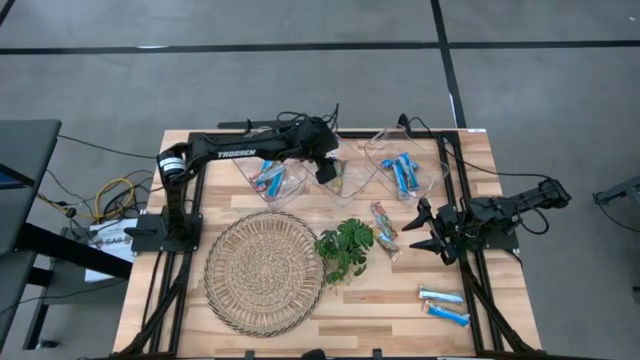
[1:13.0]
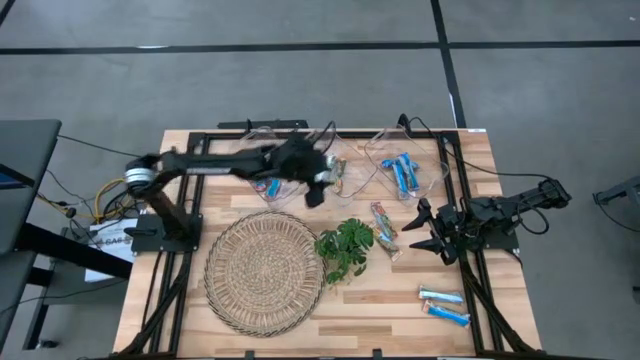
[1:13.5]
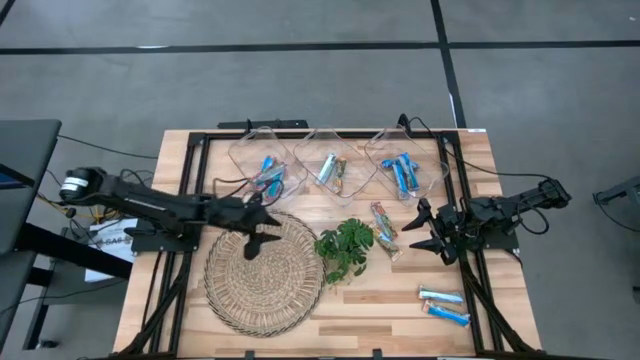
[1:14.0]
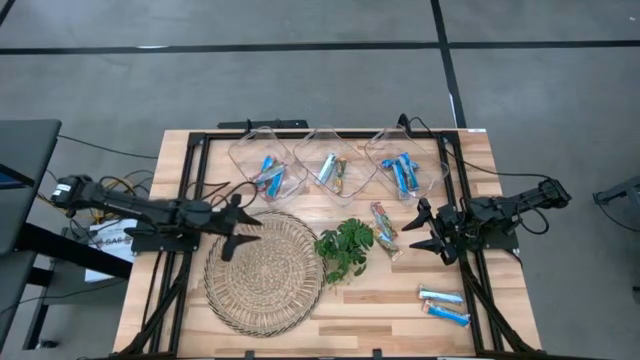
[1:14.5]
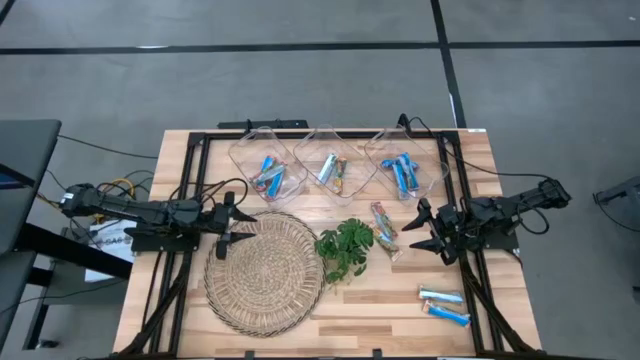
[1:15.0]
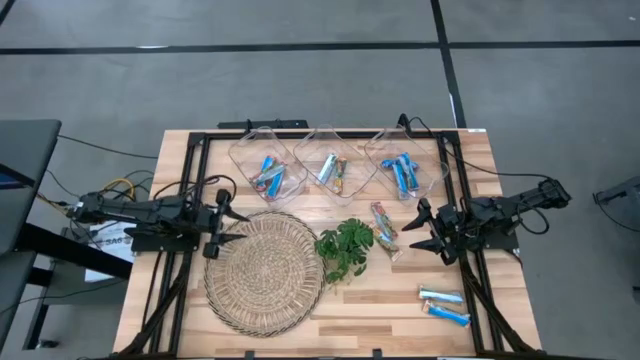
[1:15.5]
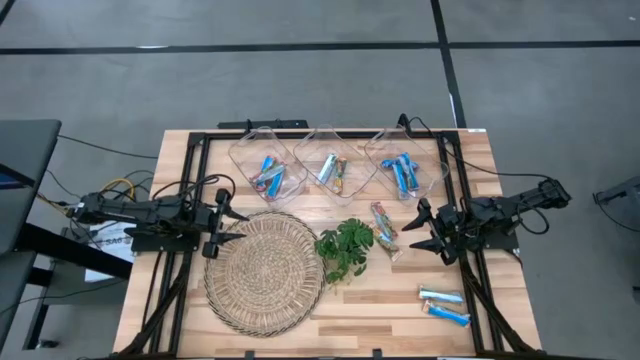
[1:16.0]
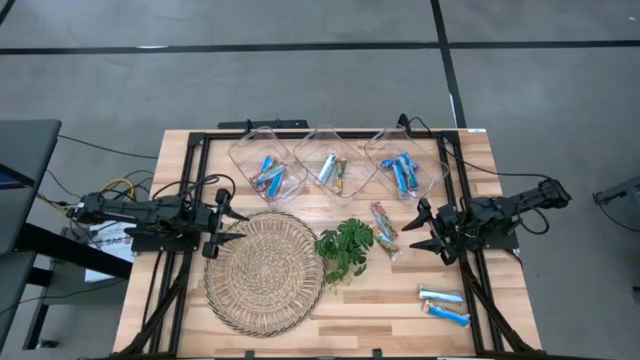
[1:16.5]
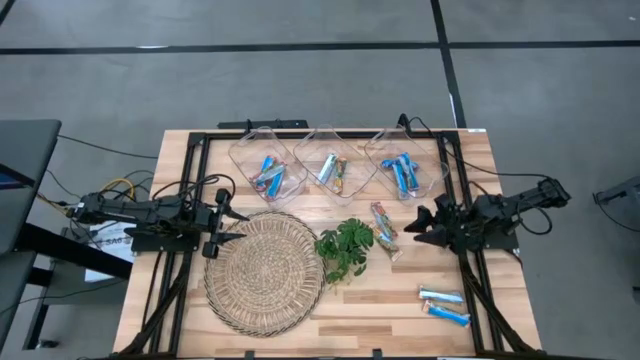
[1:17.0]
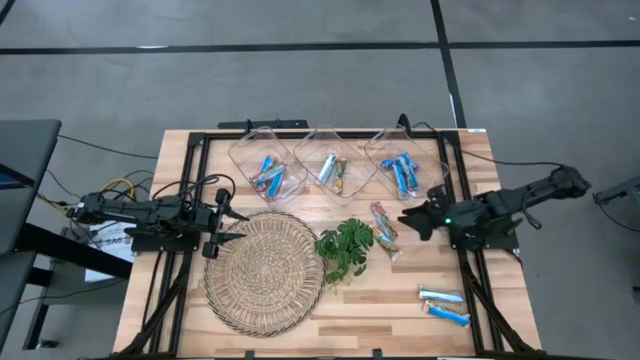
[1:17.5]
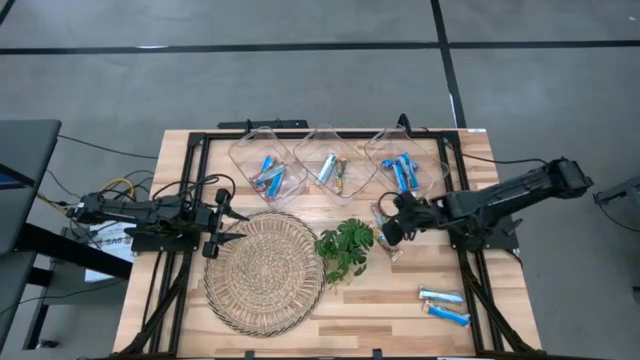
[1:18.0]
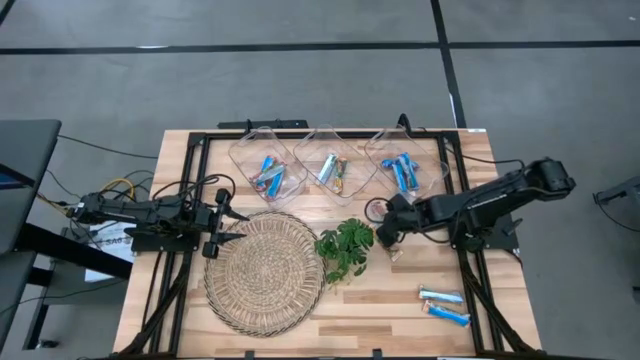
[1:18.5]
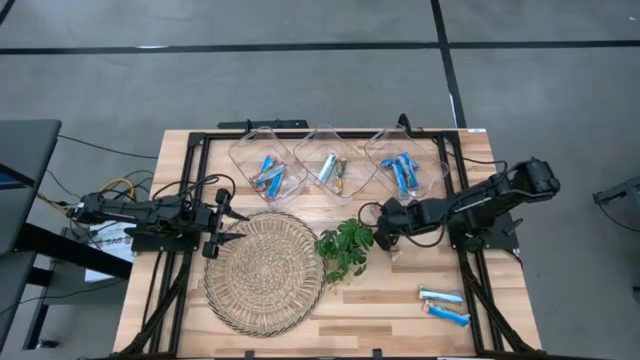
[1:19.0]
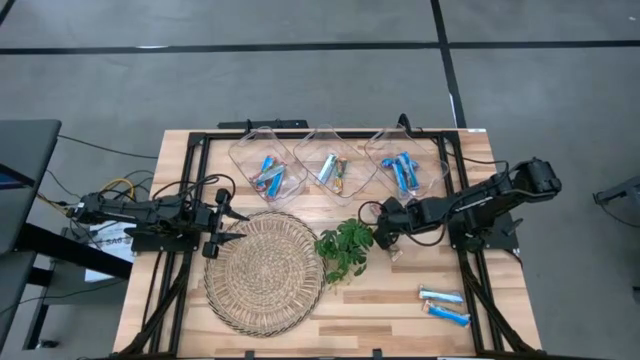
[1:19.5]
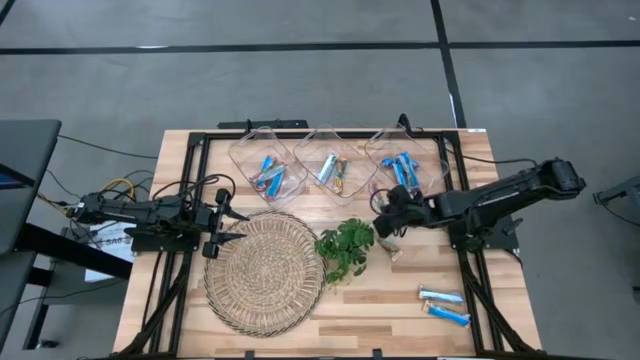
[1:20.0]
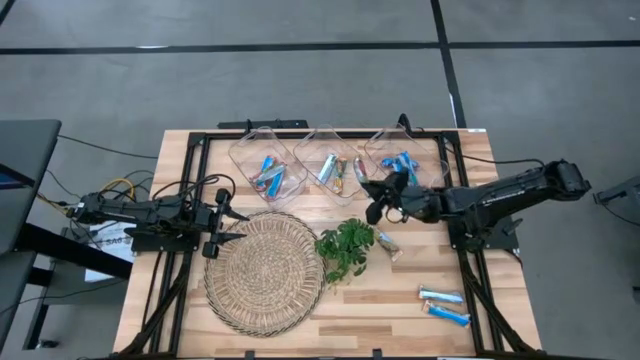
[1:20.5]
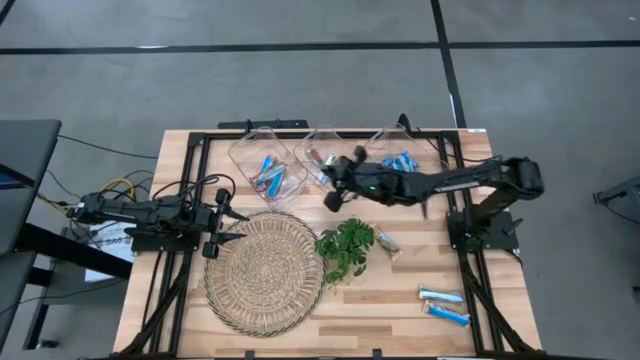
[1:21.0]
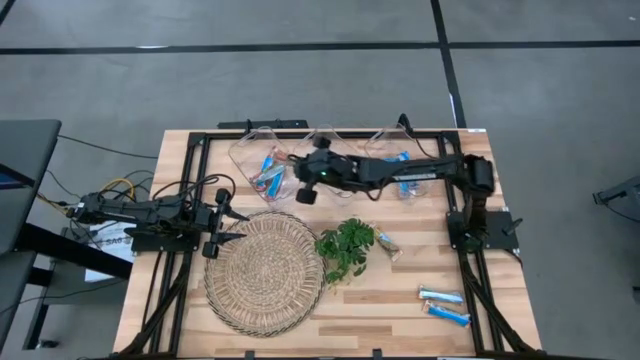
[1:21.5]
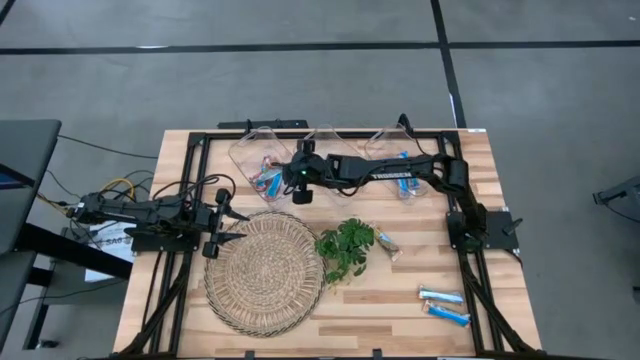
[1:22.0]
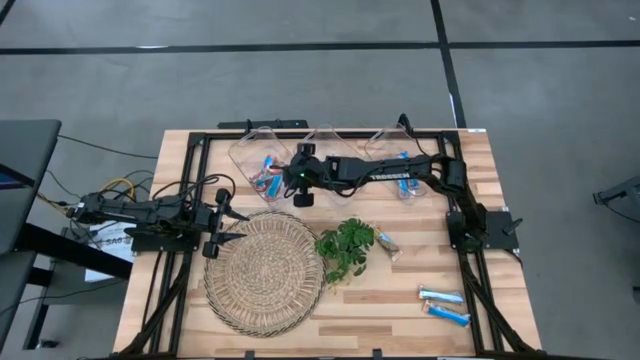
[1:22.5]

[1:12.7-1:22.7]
Task: Pick and place Granola Bars by type
Put the red granola bar into the left transparent bin

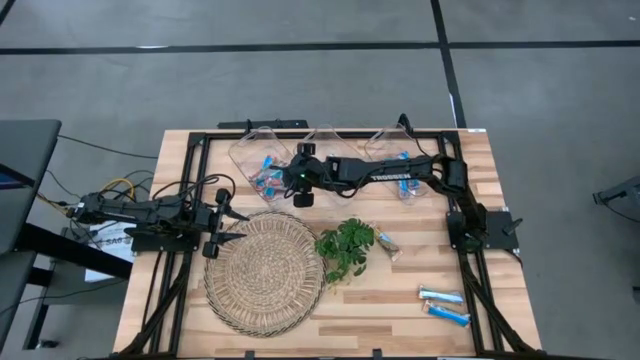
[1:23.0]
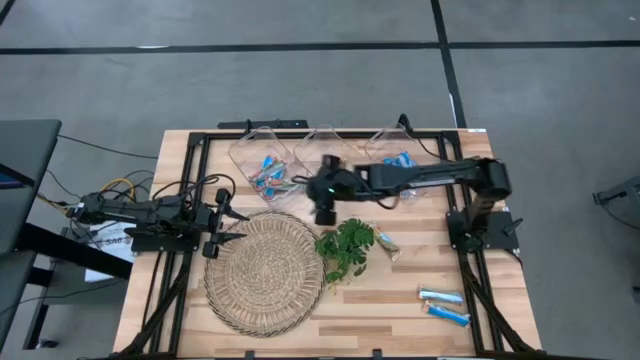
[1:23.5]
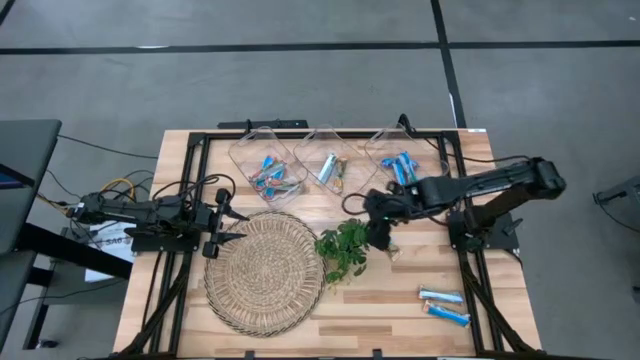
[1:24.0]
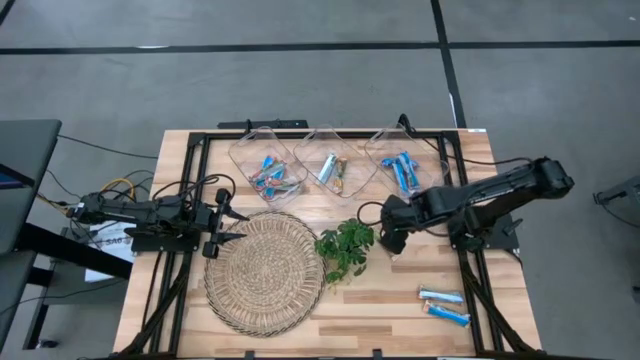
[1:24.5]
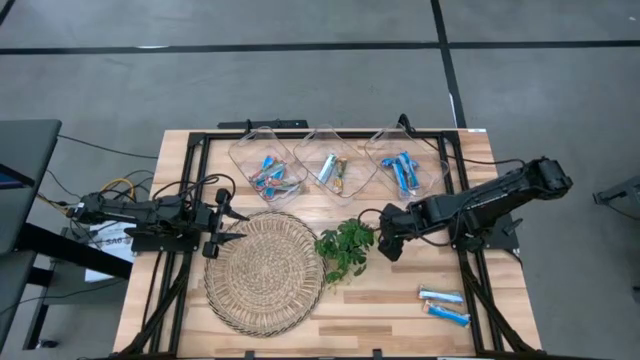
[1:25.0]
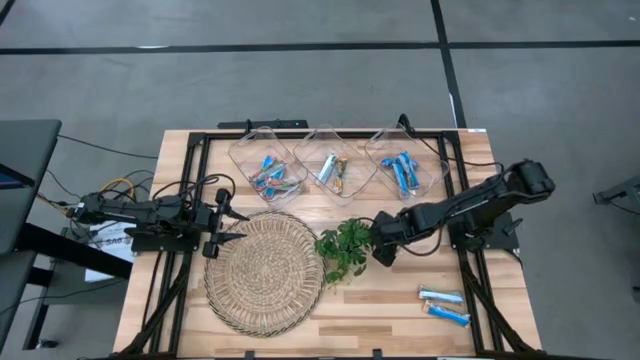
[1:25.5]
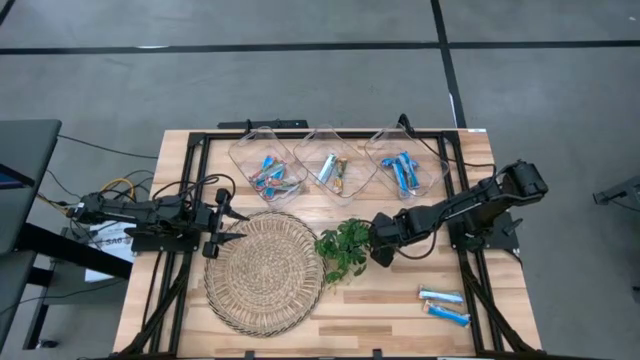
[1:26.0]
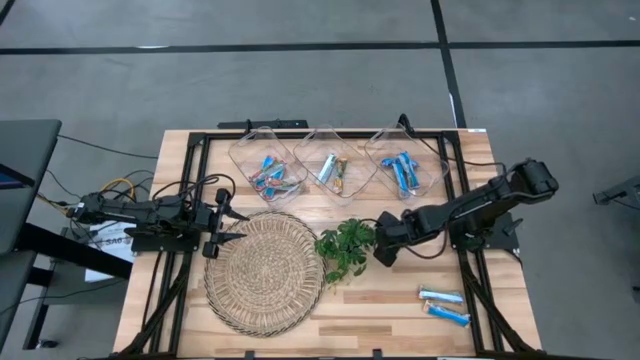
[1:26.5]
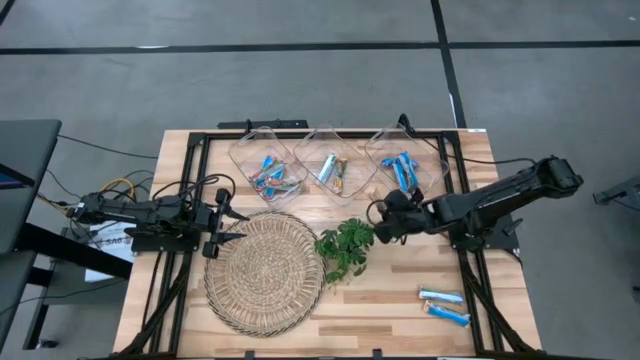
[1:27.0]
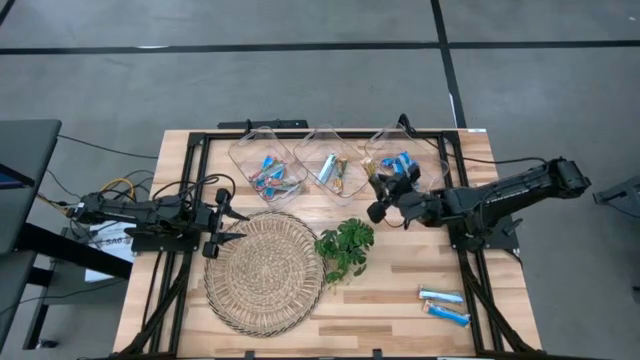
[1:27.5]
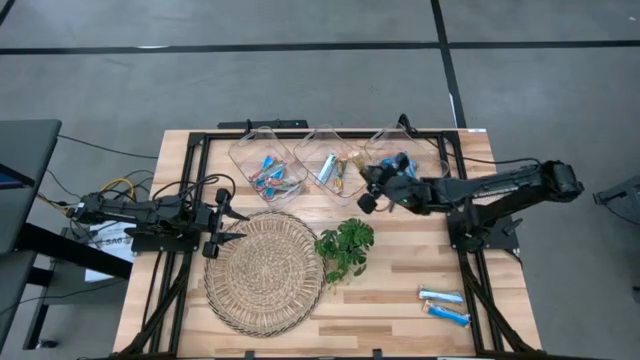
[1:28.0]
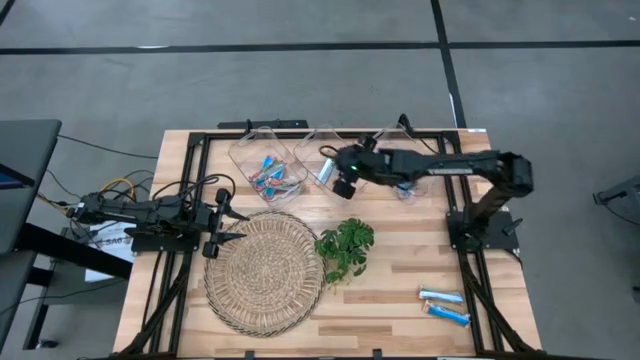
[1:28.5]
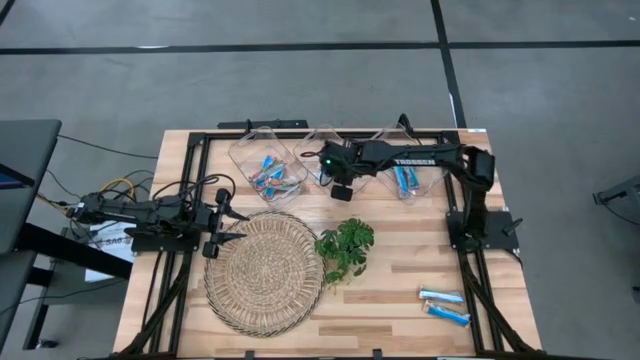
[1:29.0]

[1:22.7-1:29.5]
Put the yellow granola bar into the middle transparent bin

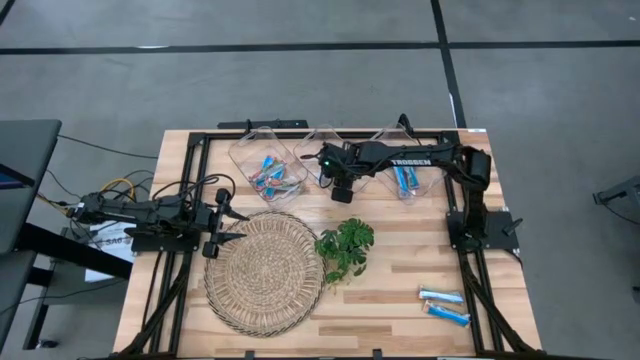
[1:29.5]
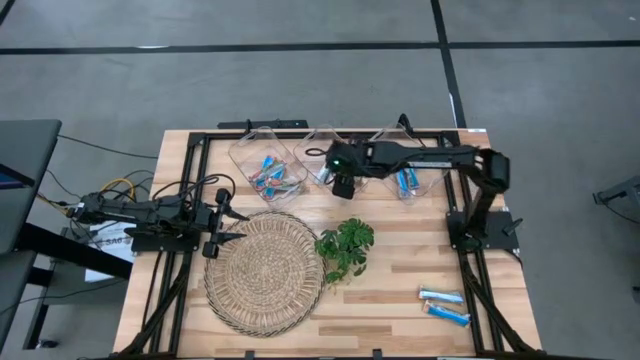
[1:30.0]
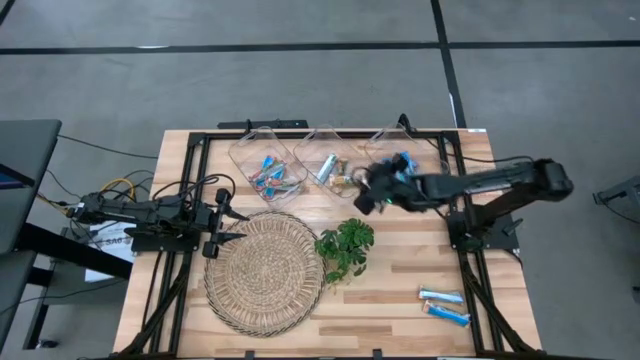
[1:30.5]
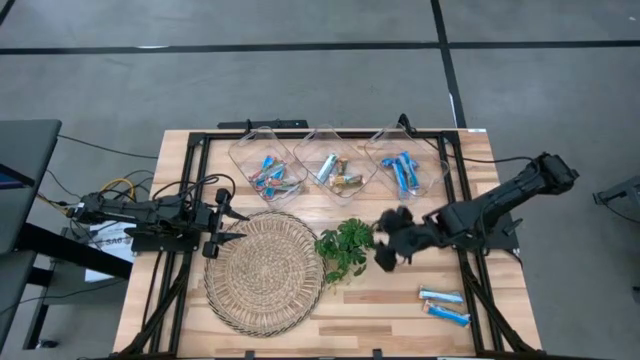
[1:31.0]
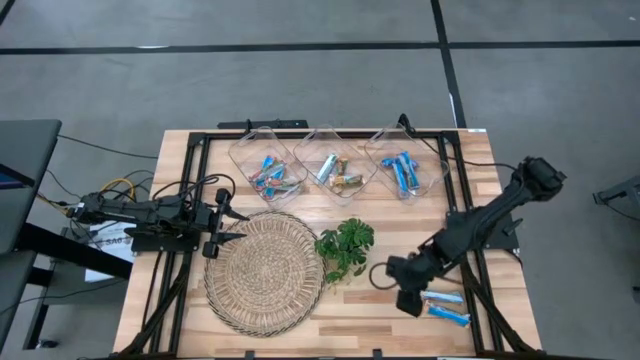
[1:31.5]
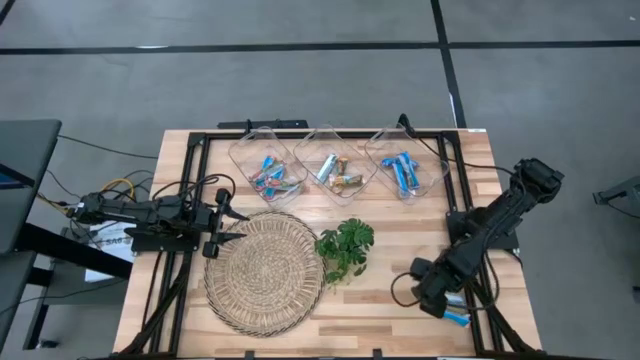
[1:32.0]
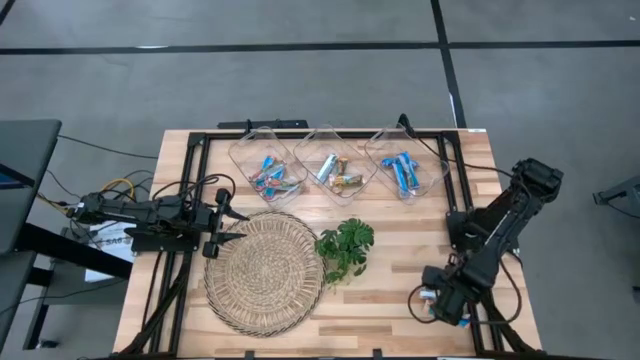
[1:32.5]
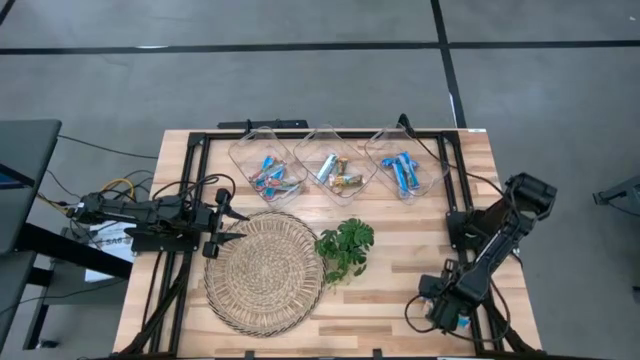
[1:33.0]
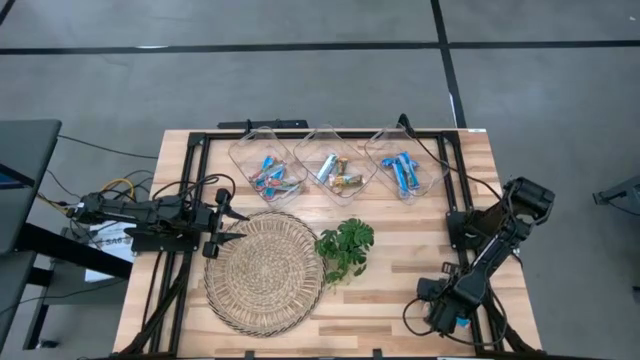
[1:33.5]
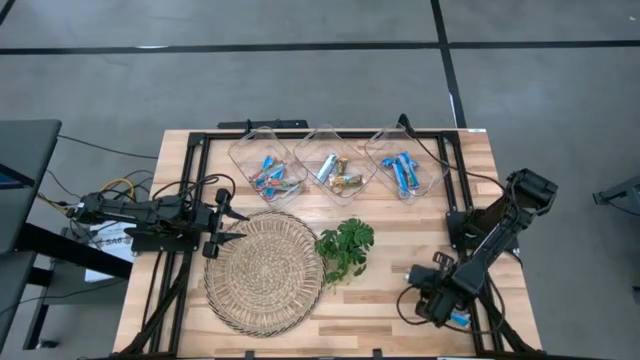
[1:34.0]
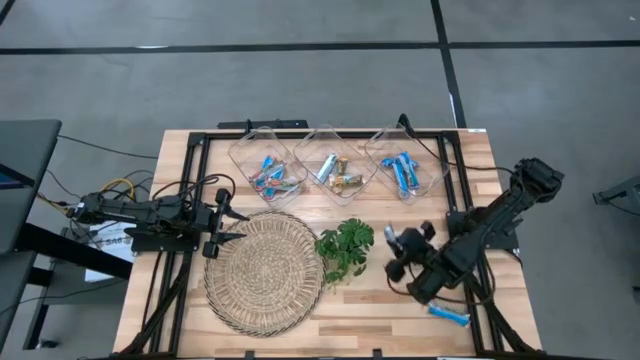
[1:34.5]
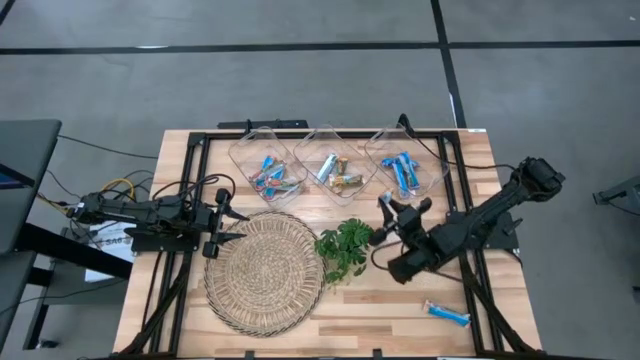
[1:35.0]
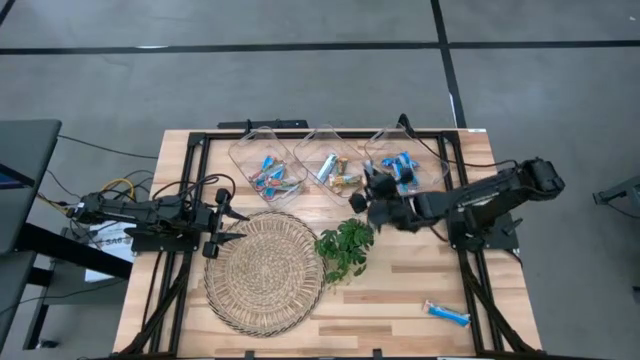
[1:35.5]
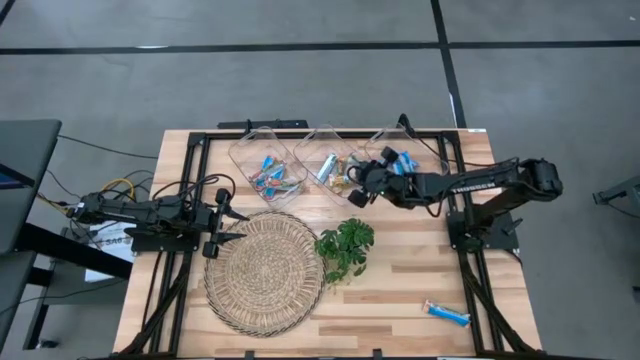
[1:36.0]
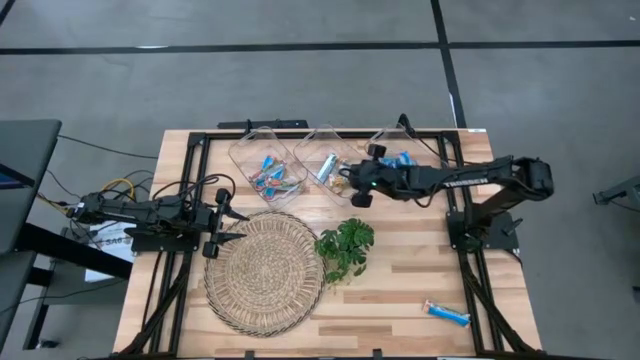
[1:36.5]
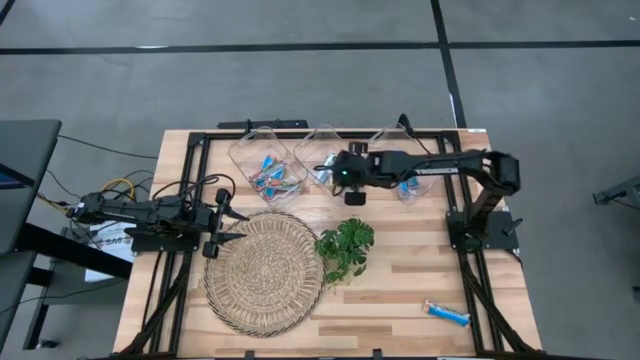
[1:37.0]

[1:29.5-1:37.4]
Put the yellow granola bar into the middle transparent bin
